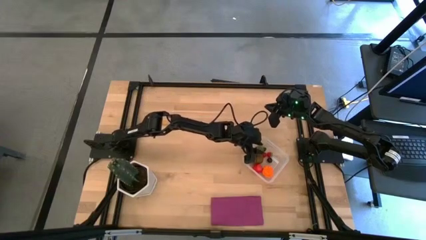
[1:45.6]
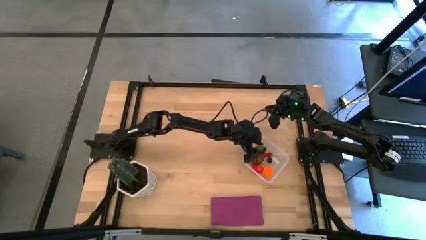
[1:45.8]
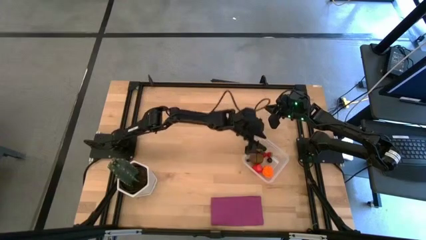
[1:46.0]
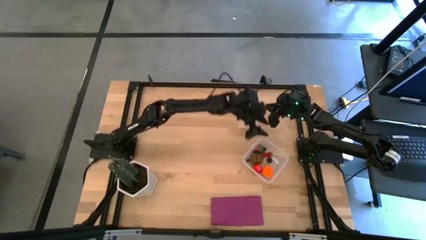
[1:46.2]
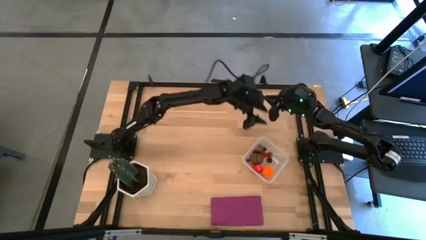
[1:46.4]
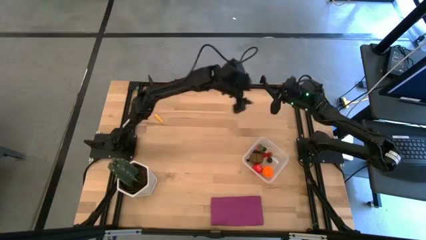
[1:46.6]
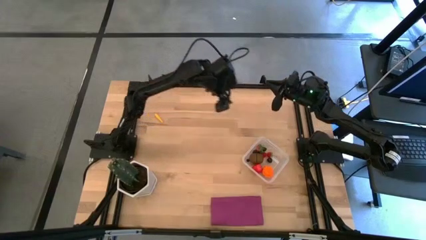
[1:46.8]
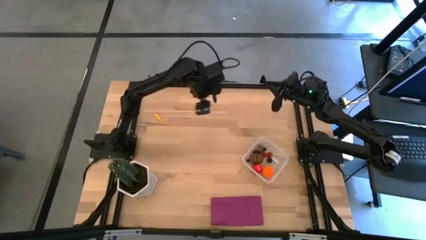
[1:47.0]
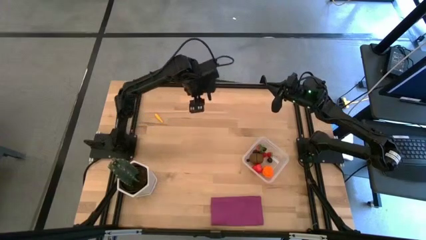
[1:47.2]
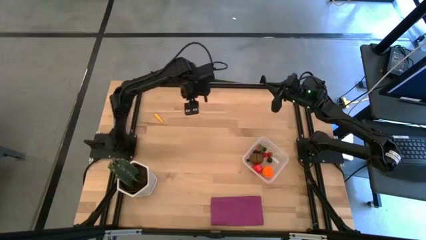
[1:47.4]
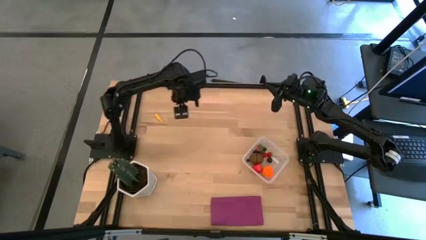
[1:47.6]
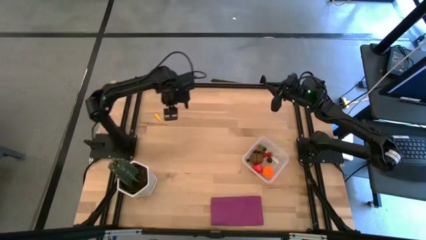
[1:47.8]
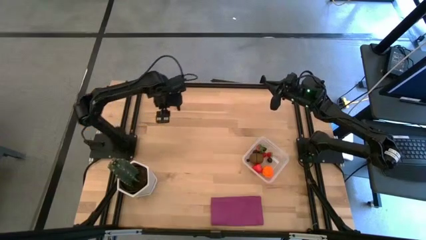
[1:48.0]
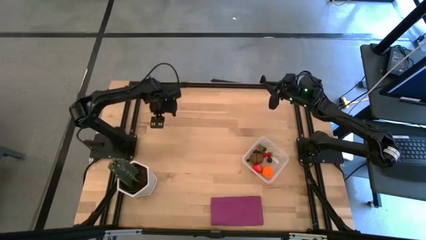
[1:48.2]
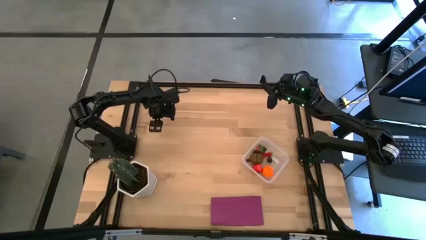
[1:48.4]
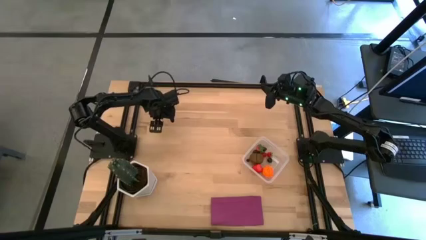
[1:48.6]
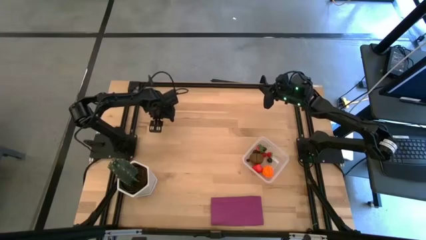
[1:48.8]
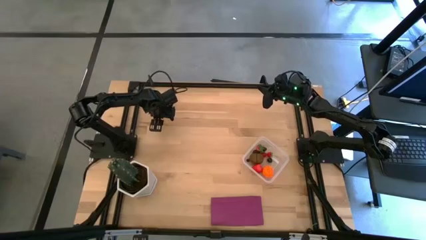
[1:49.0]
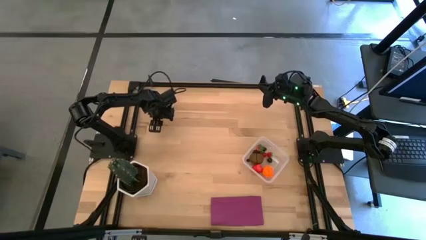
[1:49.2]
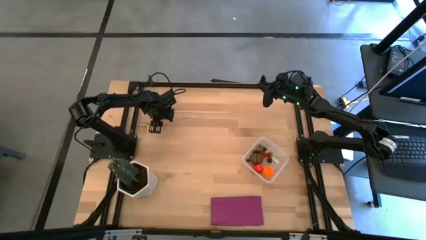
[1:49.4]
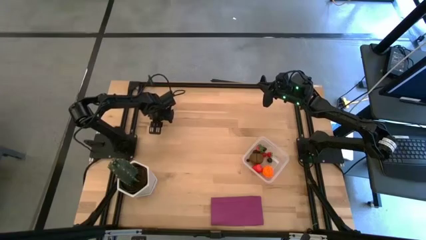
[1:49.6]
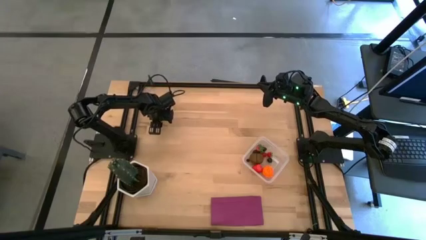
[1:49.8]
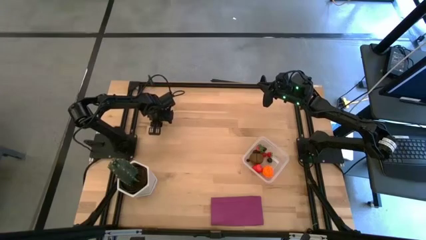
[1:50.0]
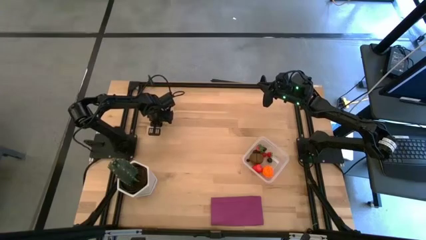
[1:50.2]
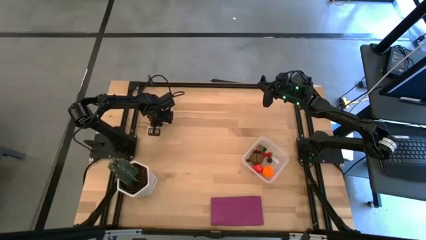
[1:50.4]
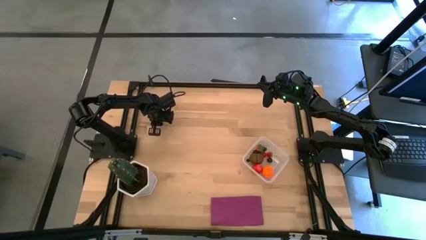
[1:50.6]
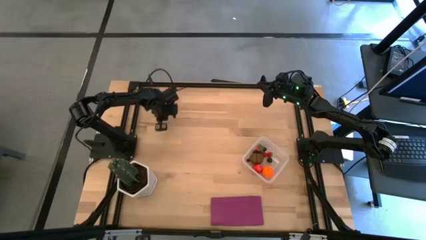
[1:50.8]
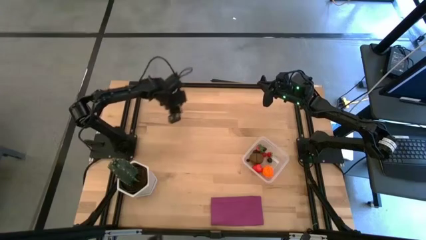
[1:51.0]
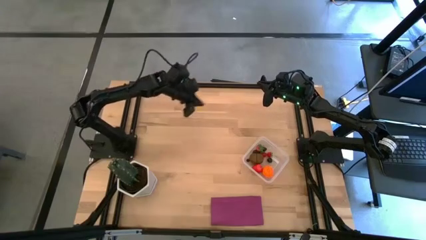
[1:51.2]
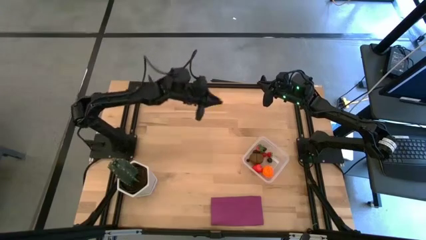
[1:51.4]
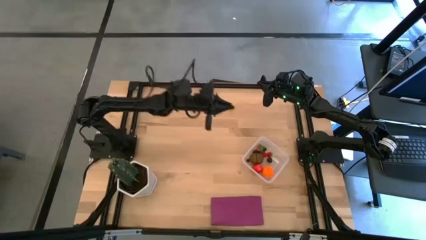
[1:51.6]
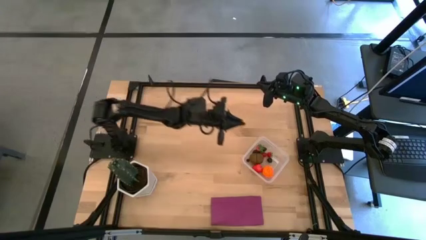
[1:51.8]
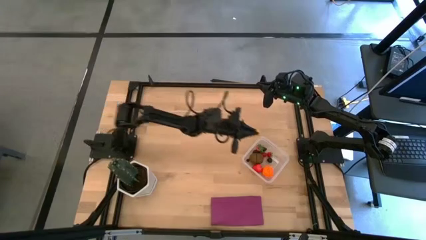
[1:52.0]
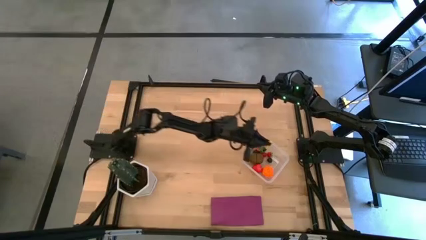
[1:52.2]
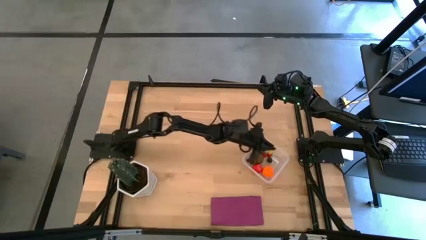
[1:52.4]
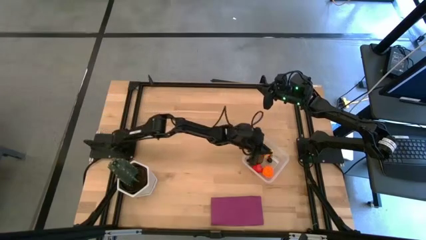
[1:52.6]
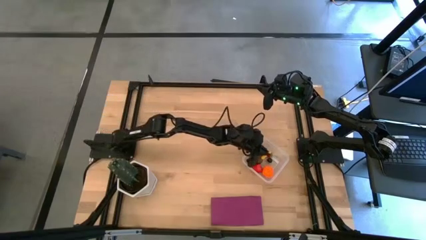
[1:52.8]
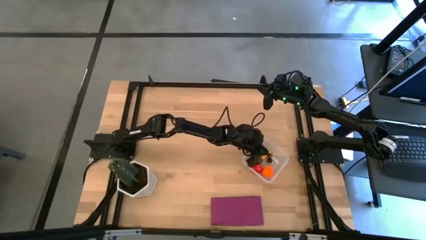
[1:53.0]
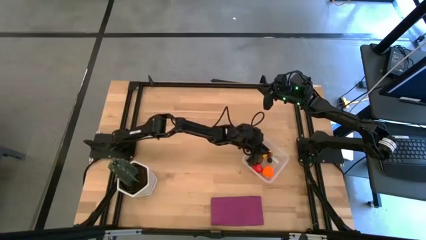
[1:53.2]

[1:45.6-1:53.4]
Task: Pick and placing Produce into tupperware
Put the corn into the transparent bin

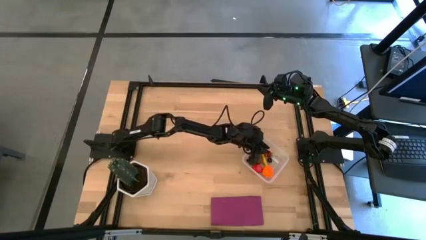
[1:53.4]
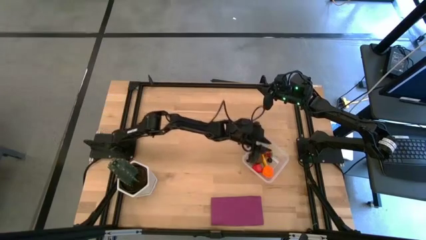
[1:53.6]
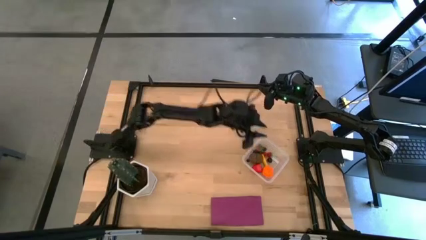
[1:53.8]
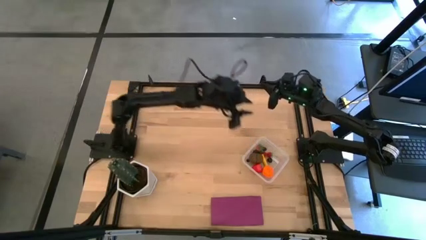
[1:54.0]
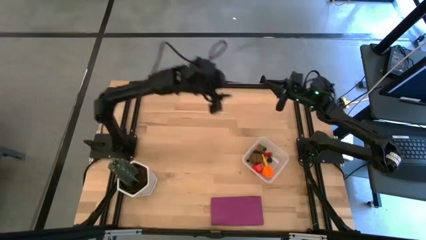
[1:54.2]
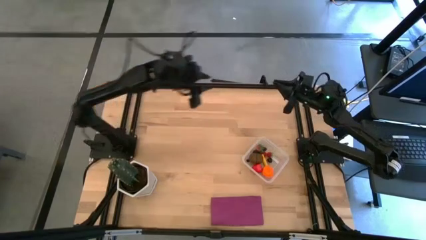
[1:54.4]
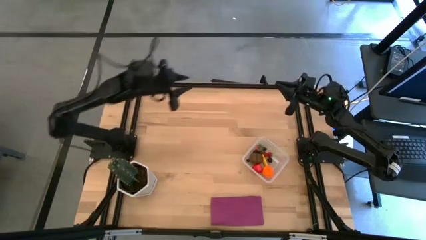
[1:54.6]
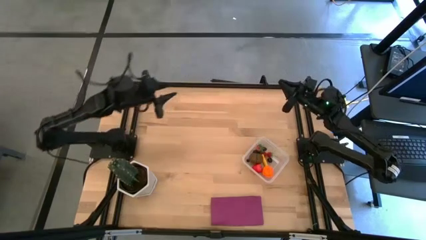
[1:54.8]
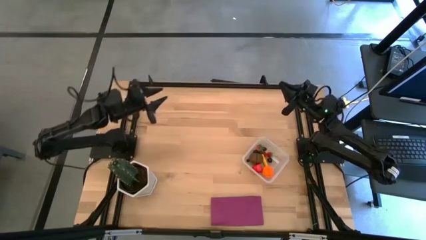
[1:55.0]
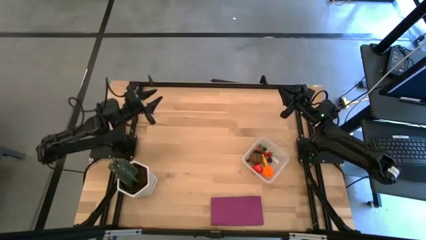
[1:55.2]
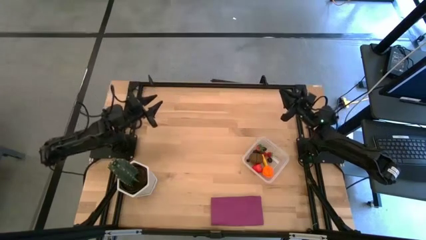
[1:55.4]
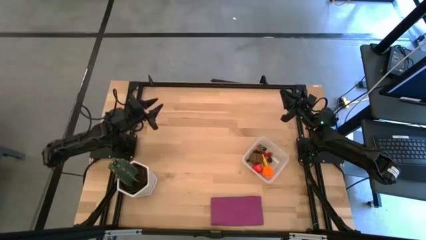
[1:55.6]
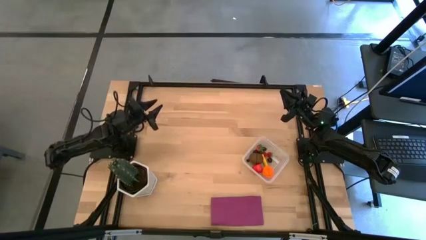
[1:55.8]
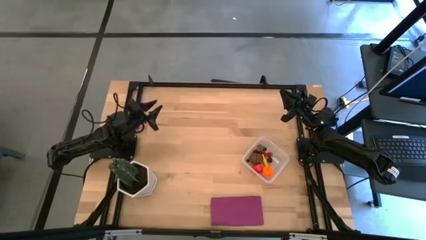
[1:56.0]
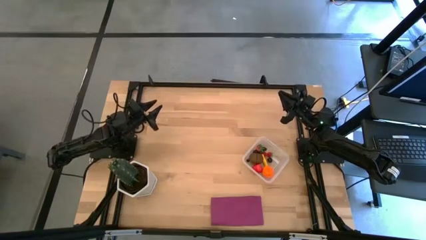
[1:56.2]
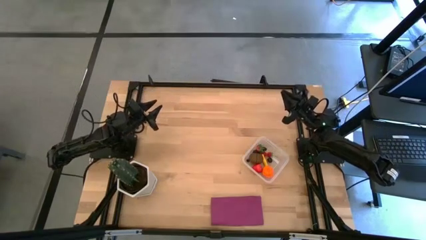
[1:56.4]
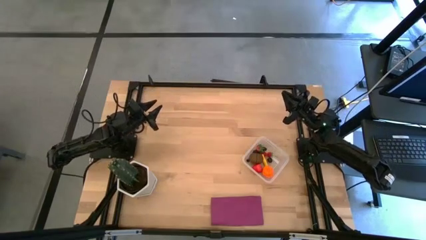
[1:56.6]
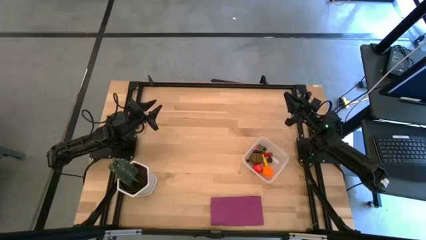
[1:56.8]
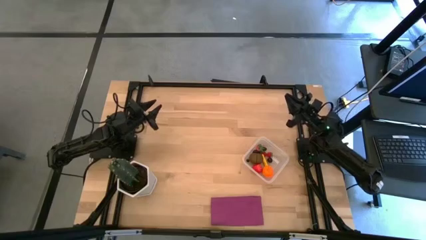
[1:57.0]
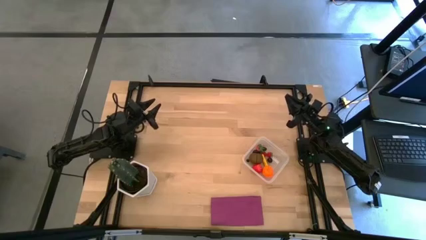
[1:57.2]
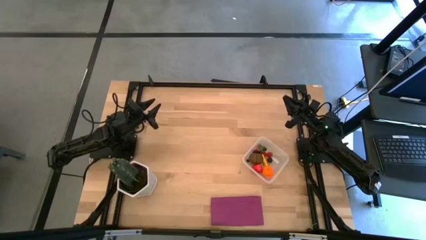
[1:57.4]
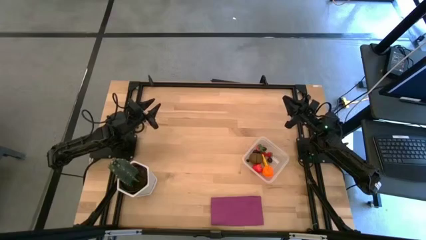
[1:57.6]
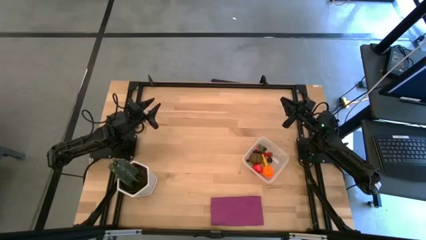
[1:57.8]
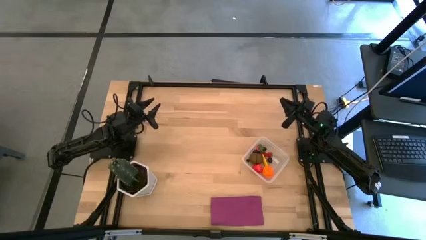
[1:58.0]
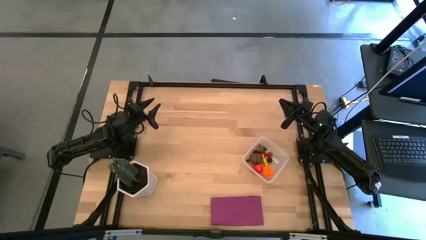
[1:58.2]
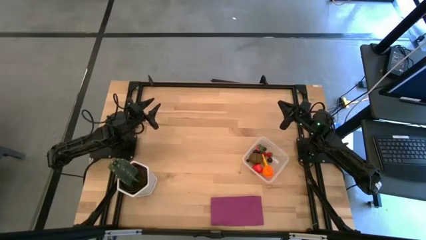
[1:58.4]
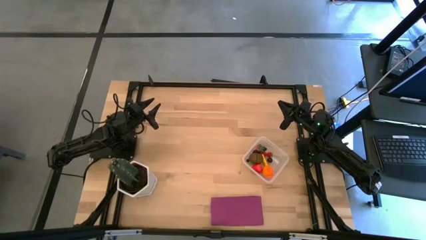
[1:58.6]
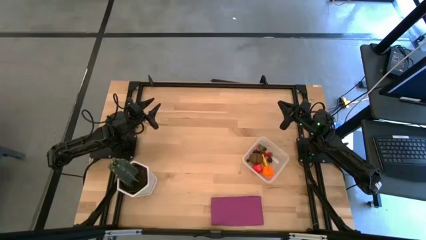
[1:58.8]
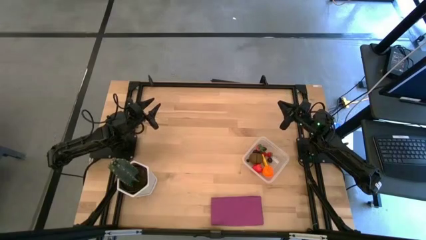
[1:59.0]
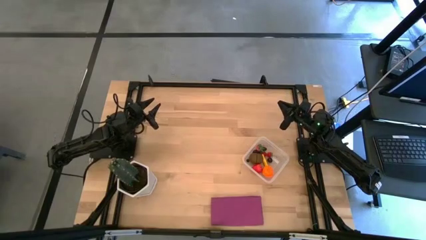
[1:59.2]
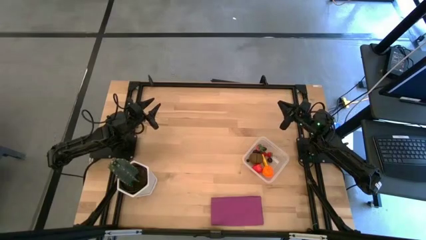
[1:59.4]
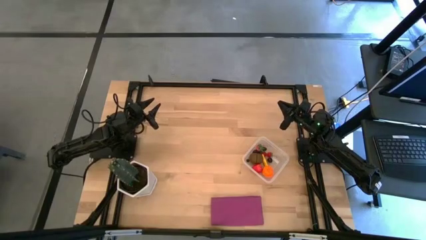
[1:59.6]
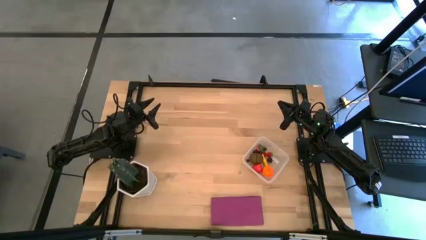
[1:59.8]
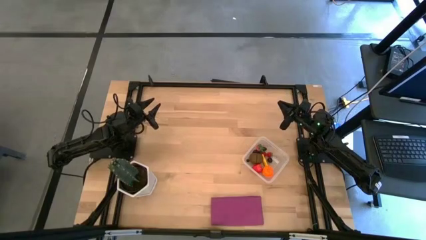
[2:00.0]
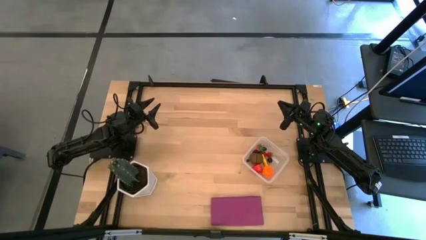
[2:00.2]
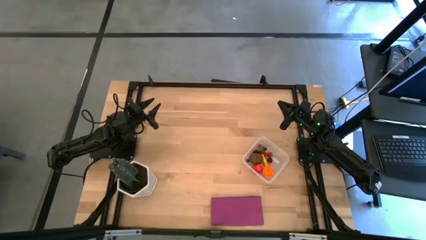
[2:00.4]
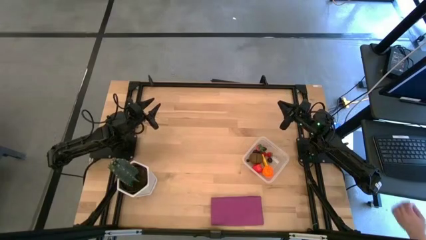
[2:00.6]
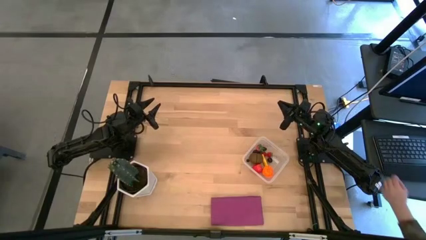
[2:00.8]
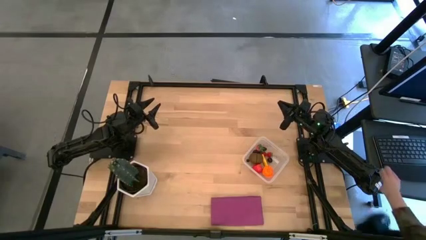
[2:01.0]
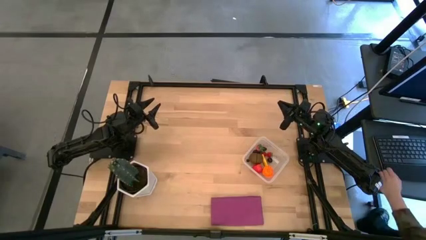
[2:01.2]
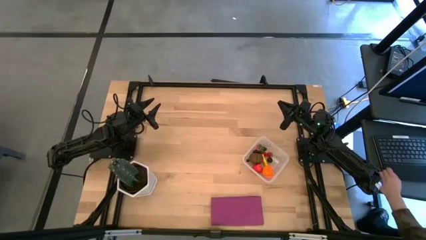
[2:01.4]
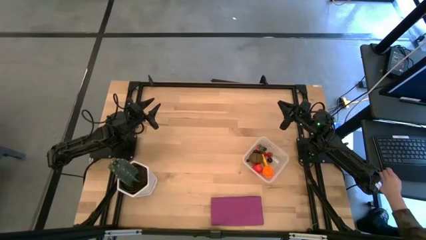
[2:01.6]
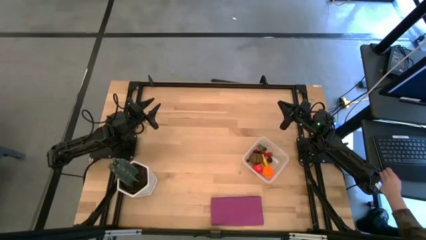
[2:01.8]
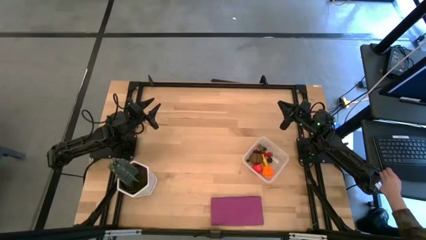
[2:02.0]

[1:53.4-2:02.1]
Return to Home Position
